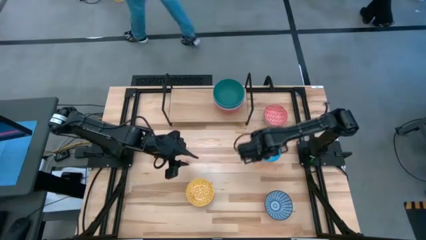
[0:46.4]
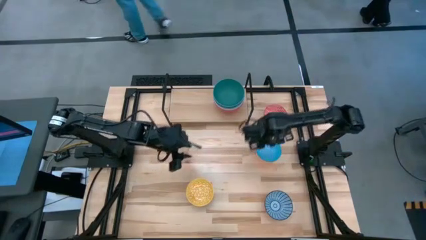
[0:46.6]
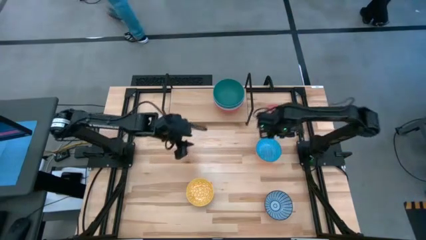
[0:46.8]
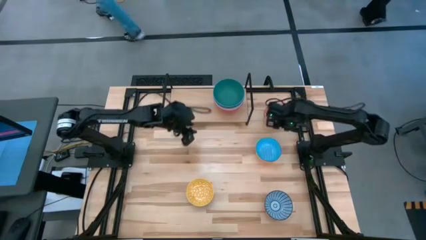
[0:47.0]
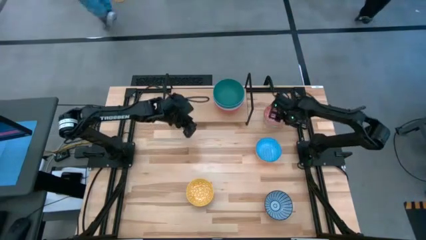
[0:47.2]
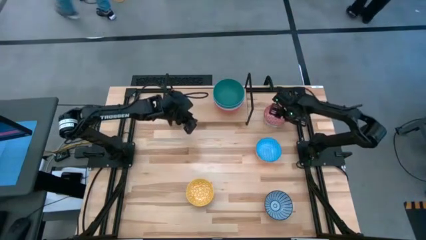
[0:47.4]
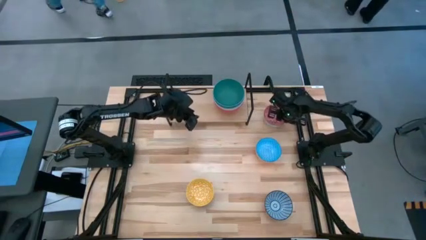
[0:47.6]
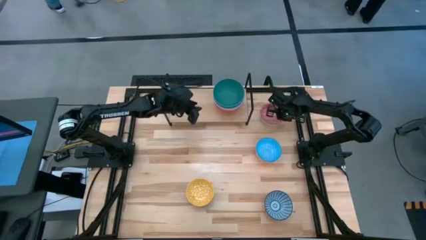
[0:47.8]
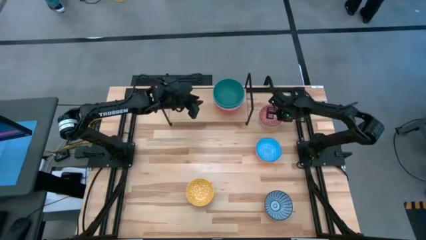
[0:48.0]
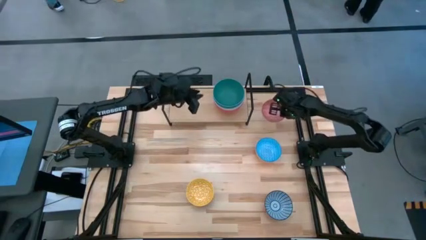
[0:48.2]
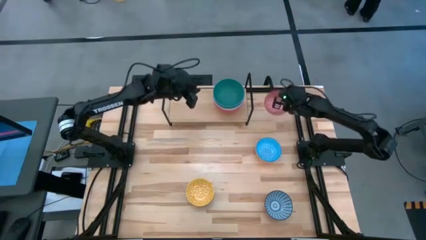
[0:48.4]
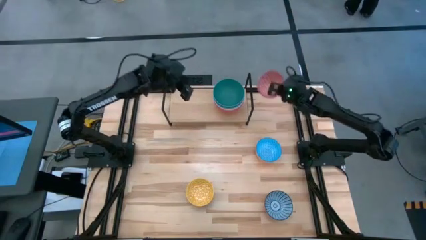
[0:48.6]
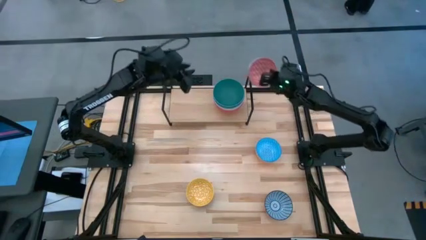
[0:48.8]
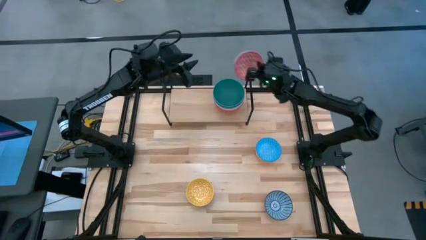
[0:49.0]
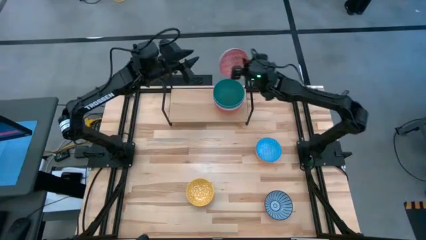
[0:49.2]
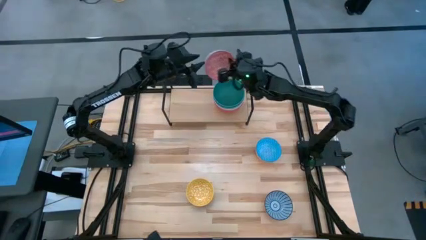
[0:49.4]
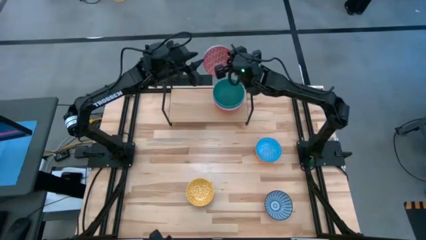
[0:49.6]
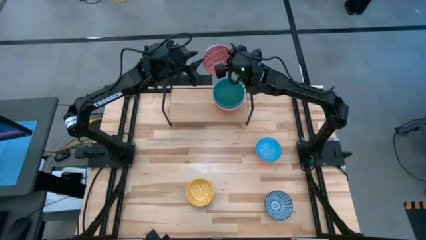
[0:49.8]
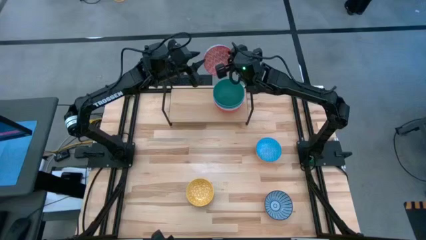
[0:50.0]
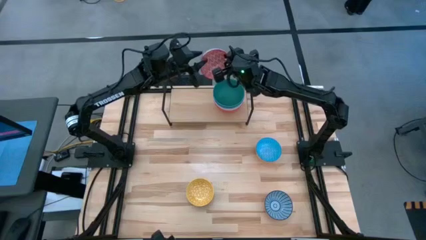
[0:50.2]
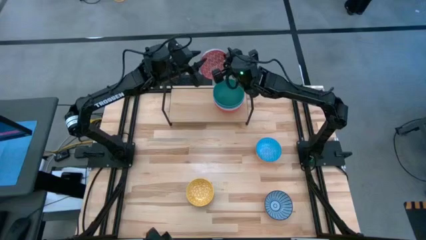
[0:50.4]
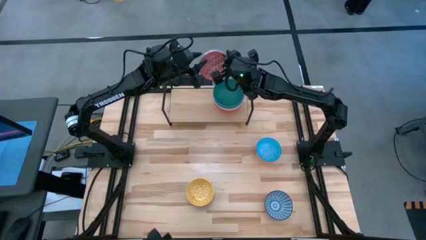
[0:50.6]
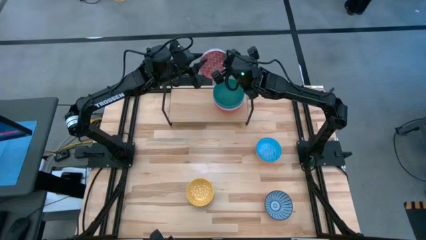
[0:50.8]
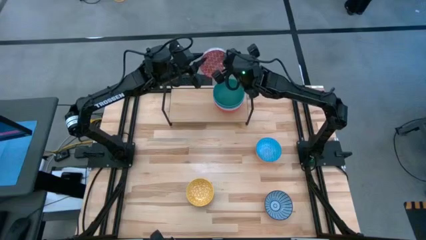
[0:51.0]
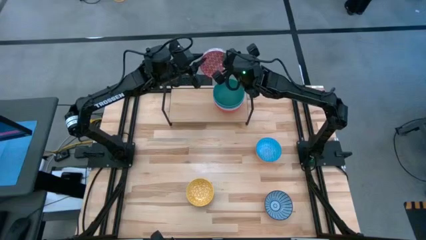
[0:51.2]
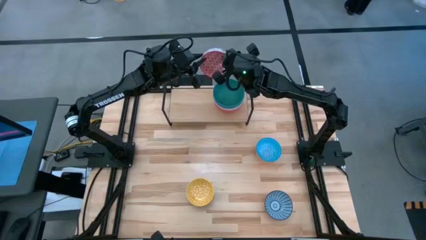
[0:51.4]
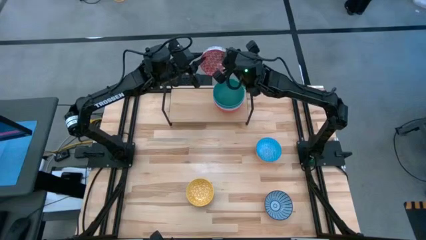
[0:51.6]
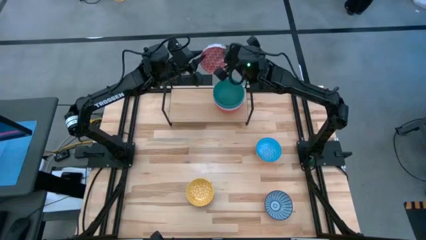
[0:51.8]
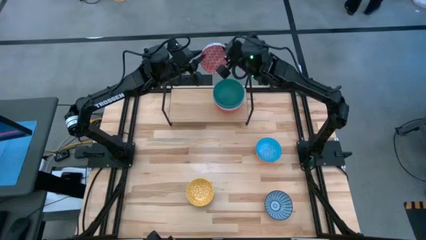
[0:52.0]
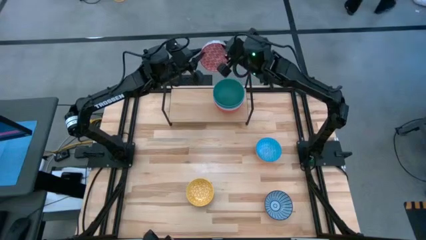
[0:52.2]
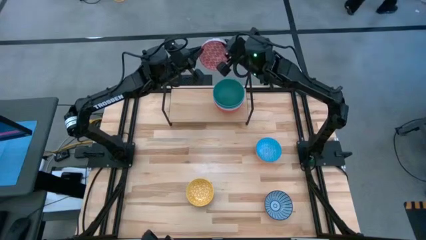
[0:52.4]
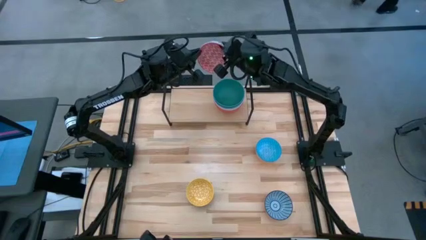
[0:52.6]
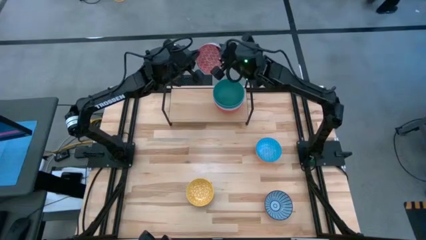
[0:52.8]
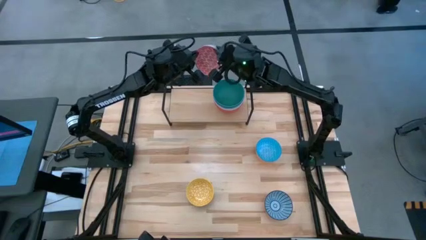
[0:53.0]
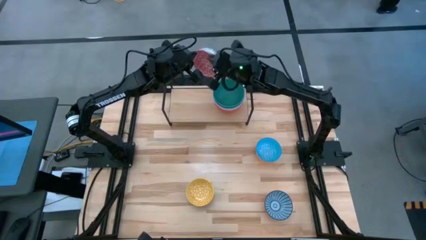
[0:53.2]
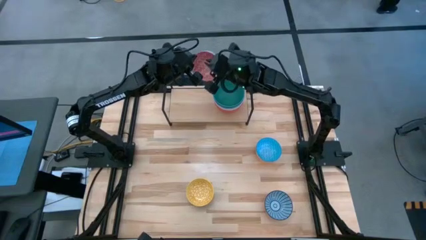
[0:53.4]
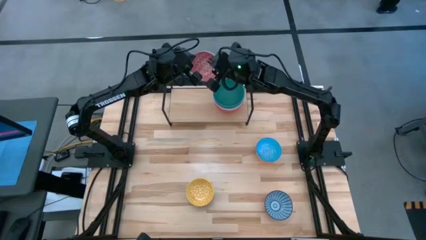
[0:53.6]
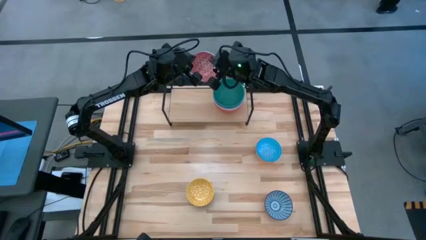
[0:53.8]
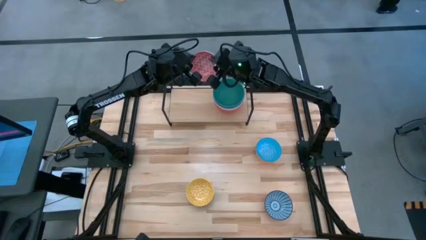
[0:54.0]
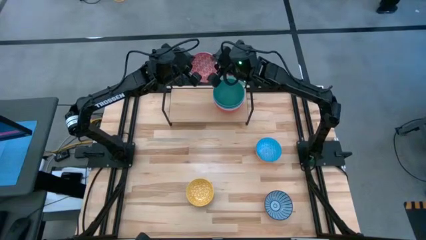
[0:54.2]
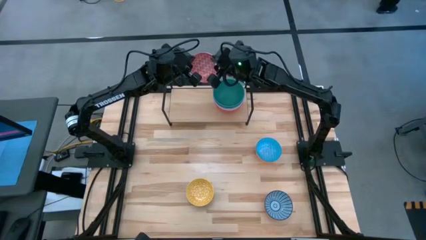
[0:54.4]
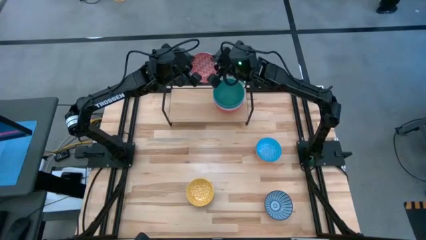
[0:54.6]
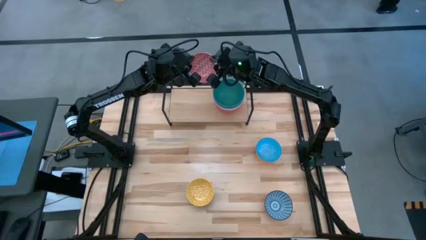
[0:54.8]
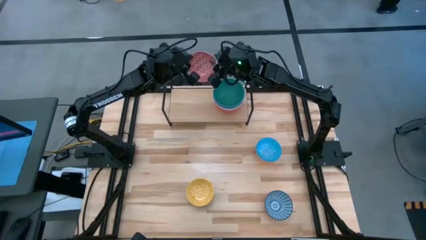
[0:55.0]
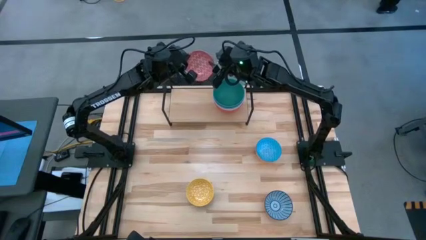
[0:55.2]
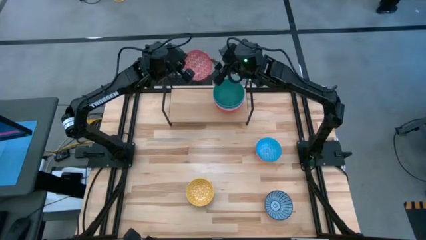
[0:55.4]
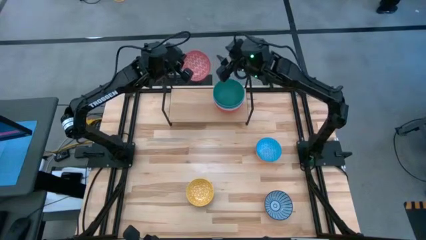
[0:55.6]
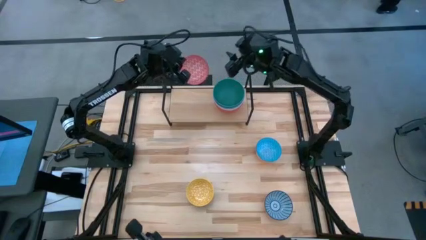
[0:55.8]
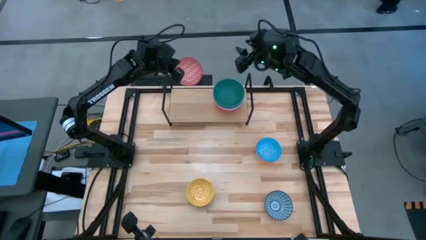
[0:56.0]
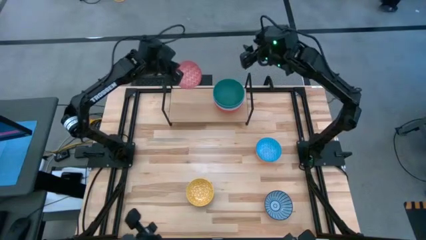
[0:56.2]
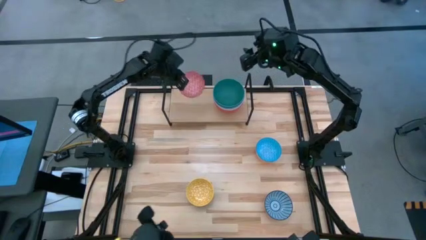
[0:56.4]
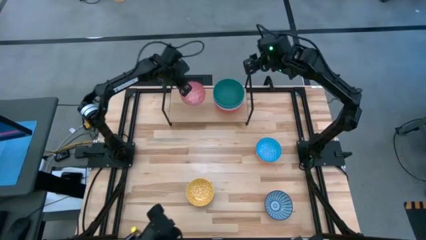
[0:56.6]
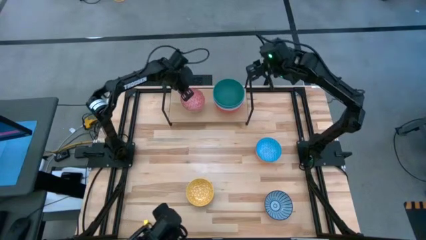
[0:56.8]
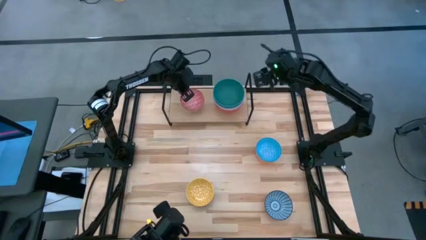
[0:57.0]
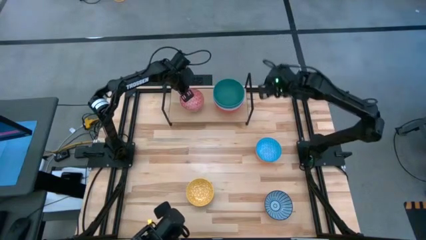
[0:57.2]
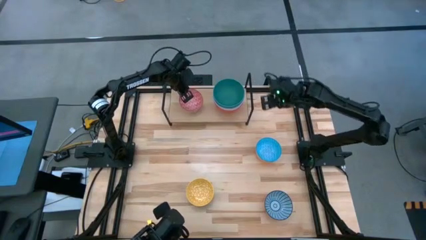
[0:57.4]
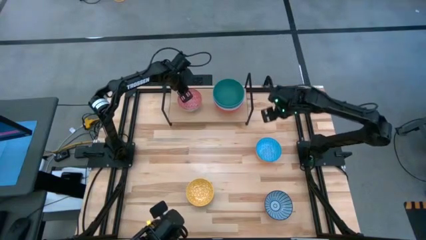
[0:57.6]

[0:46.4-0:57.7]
Task: Place and stack bowls onto a shelf
Put the red patterned bowl on the shelf

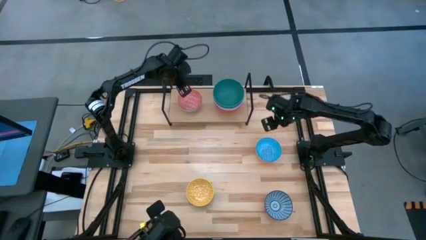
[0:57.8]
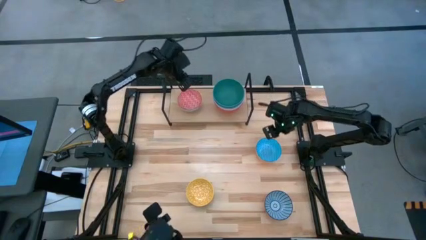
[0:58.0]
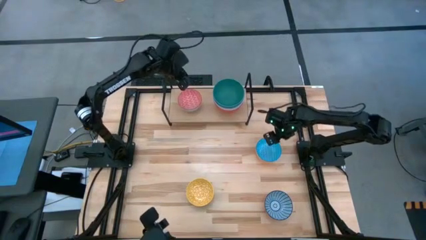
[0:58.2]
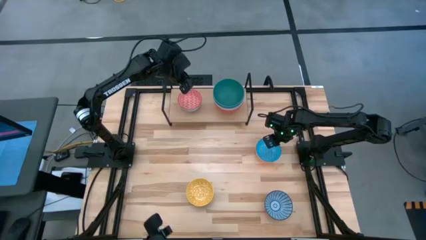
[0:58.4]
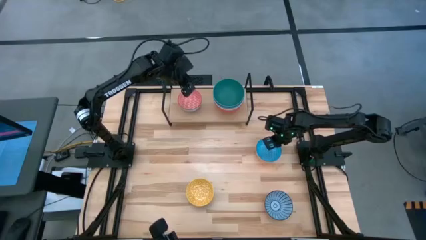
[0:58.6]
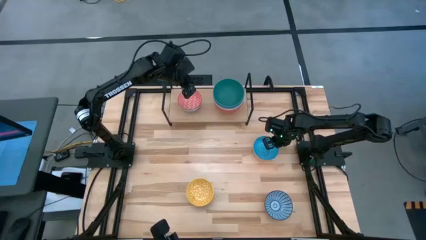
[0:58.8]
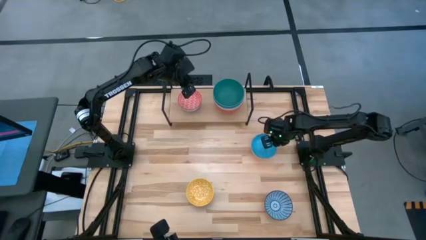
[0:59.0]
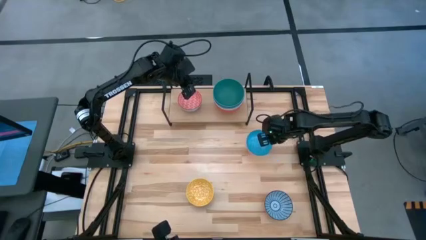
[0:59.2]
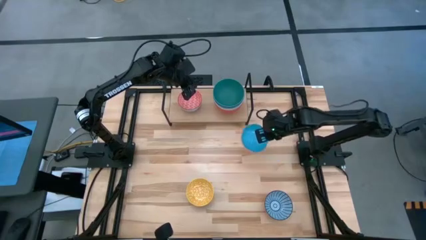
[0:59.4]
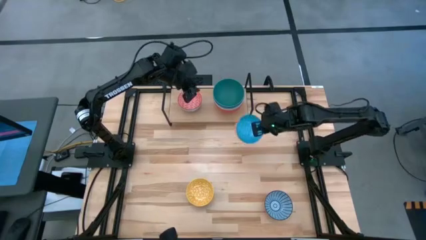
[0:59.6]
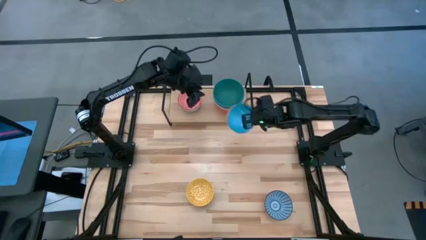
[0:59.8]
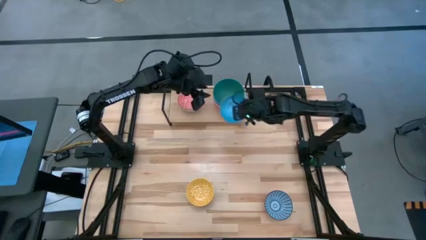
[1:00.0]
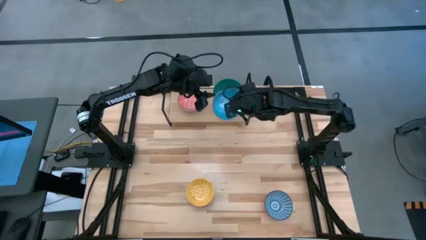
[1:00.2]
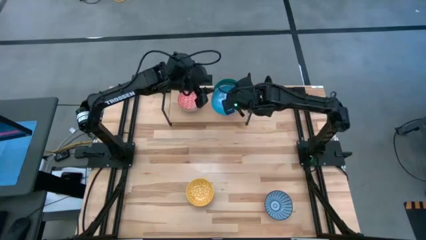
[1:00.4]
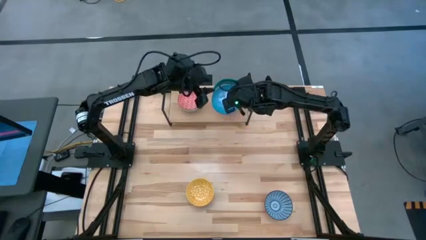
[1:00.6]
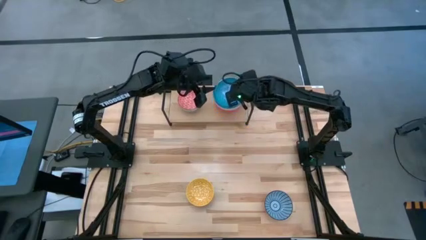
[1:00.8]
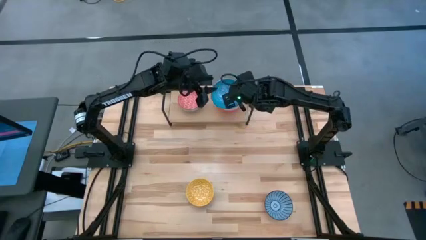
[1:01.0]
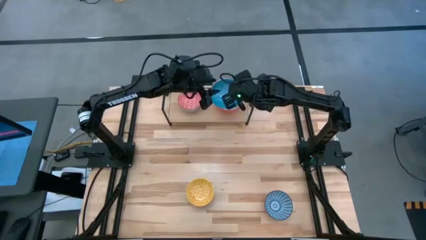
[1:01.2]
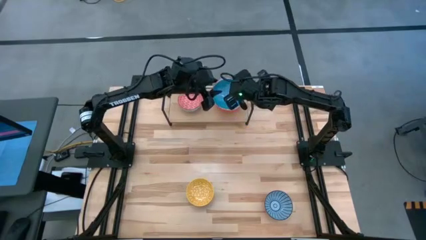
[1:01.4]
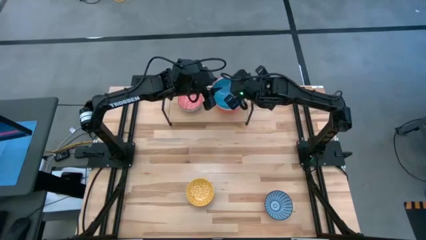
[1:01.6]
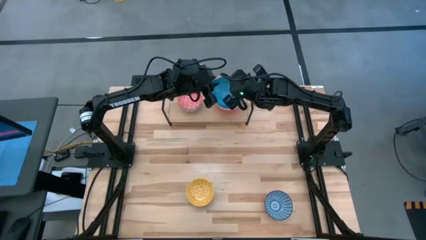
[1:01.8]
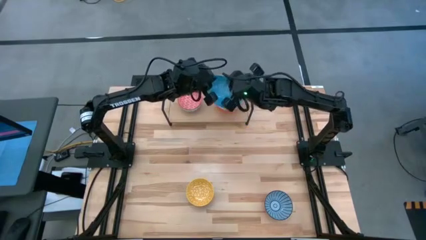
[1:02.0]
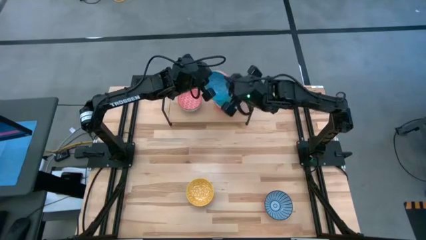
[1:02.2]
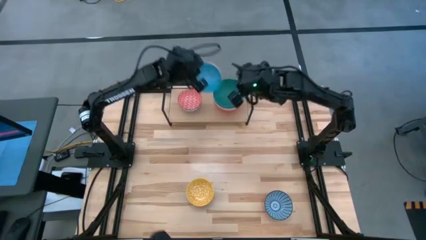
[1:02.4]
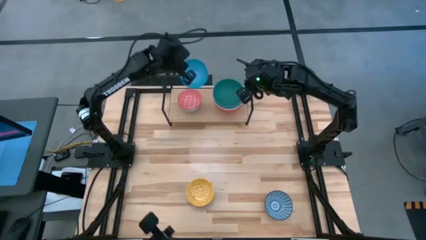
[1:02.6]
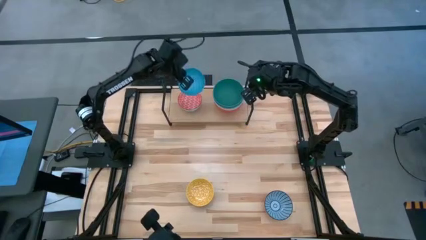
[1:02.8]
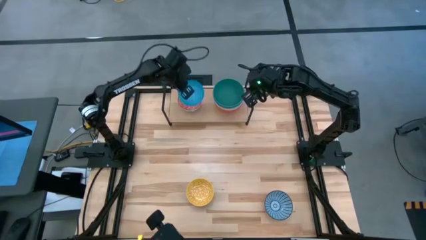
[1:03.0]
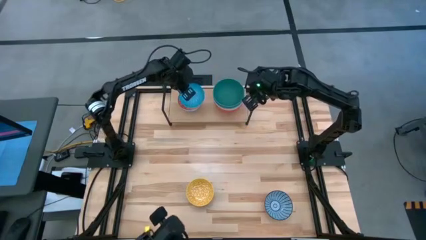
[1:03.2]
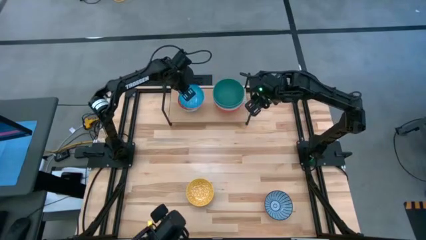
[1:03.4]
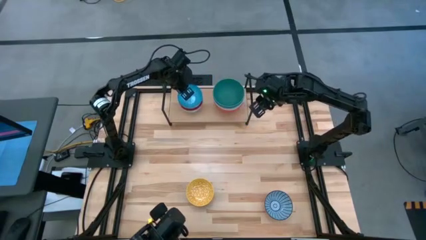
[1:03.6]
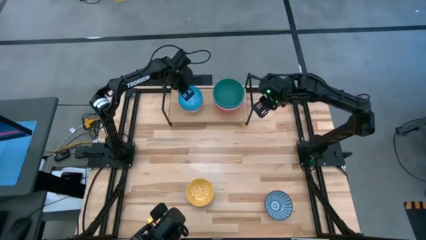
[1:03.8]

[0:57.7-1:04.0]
Stack the light blue patterned bowl on top of the red patterned bowl on the shelf
